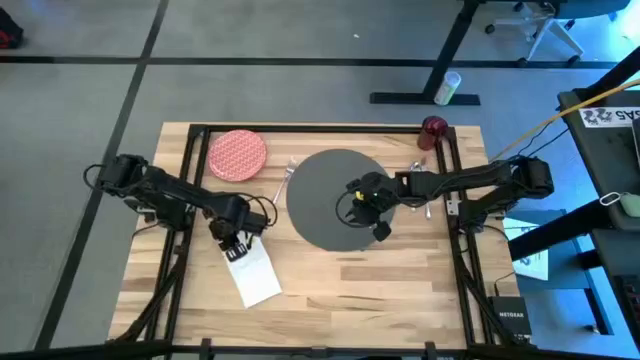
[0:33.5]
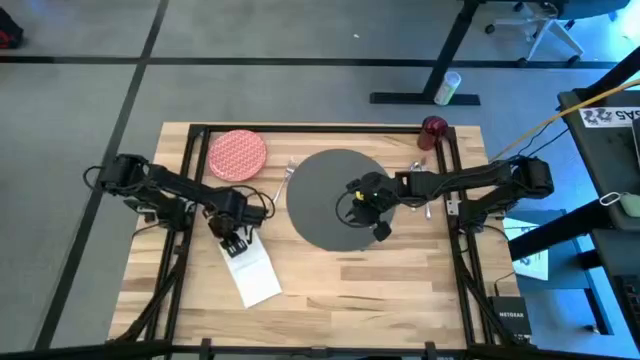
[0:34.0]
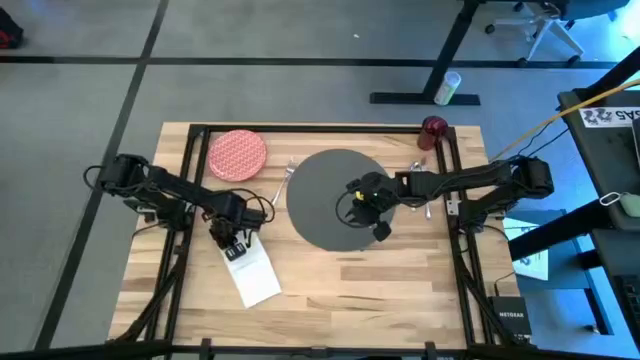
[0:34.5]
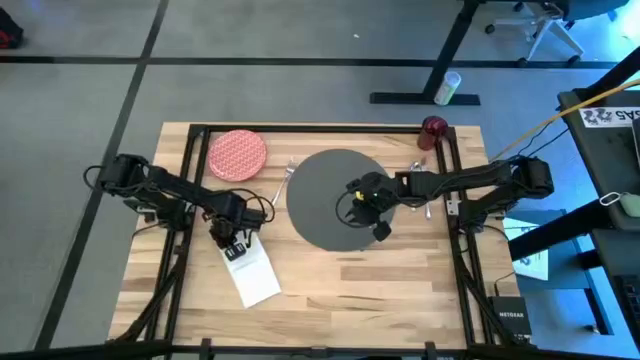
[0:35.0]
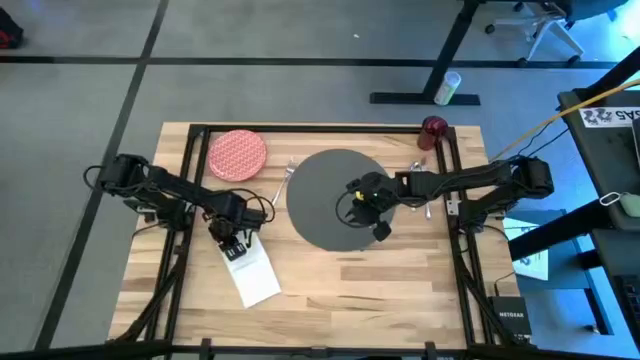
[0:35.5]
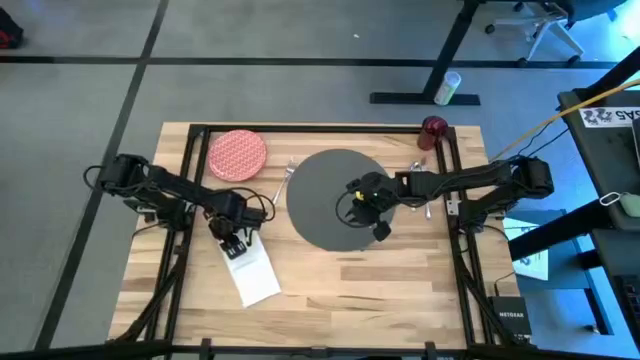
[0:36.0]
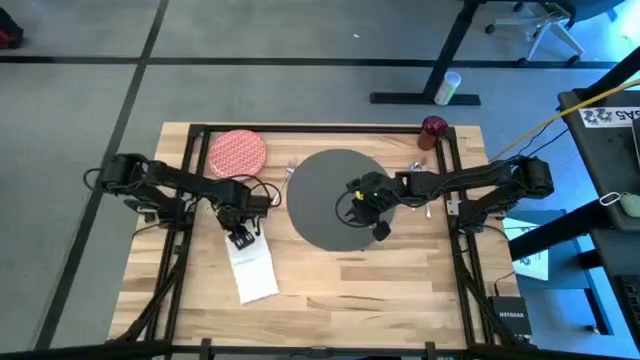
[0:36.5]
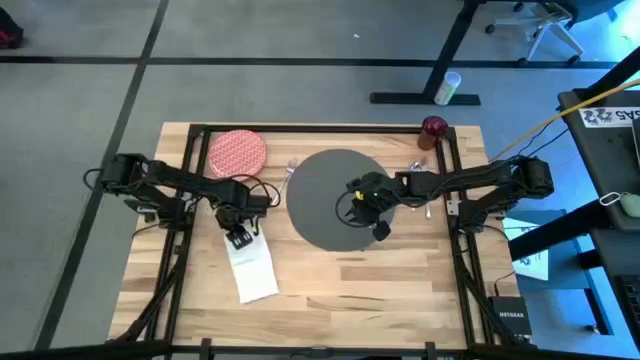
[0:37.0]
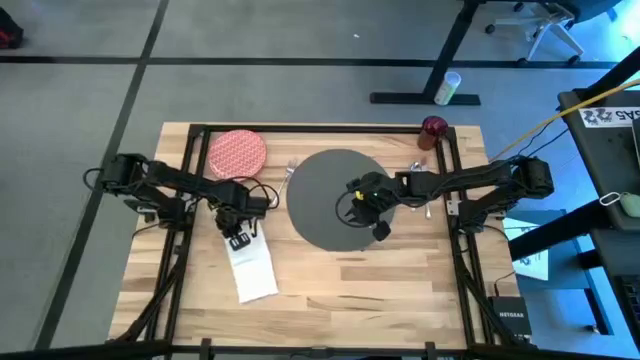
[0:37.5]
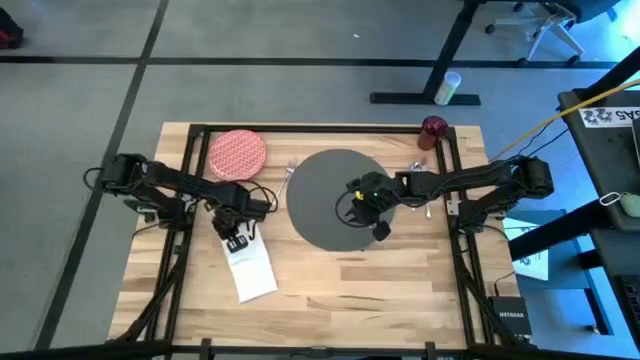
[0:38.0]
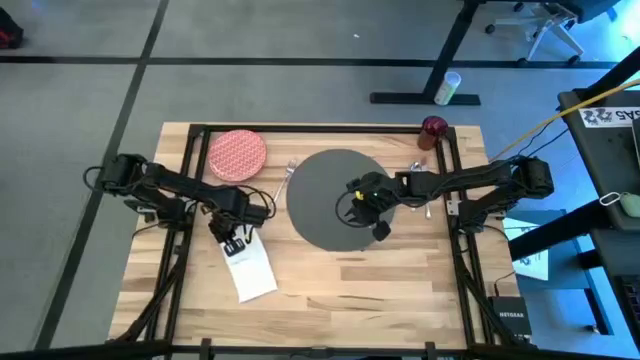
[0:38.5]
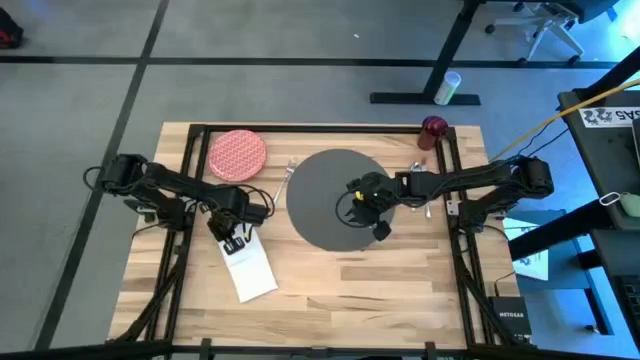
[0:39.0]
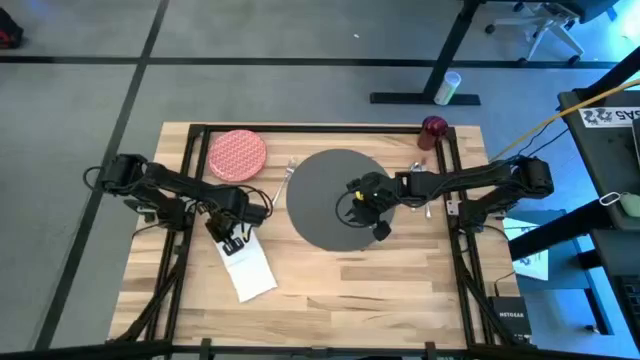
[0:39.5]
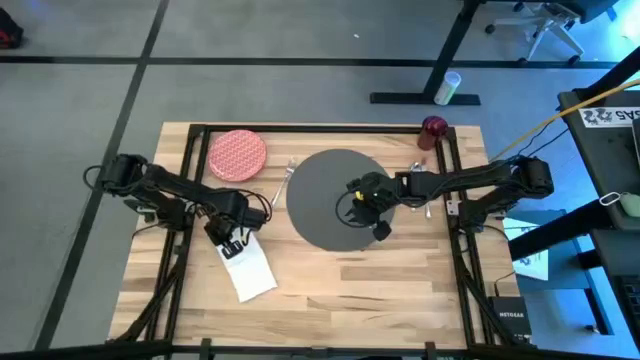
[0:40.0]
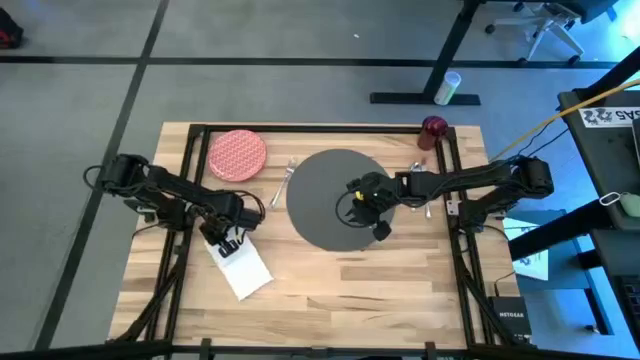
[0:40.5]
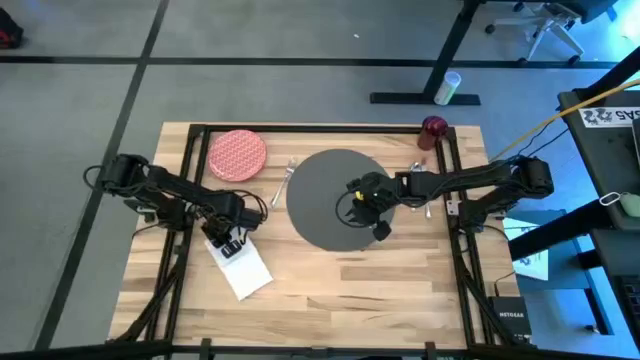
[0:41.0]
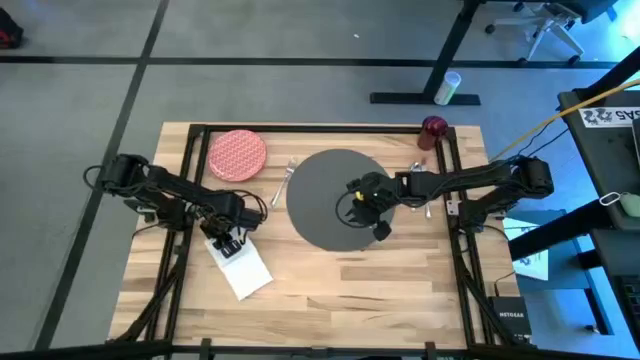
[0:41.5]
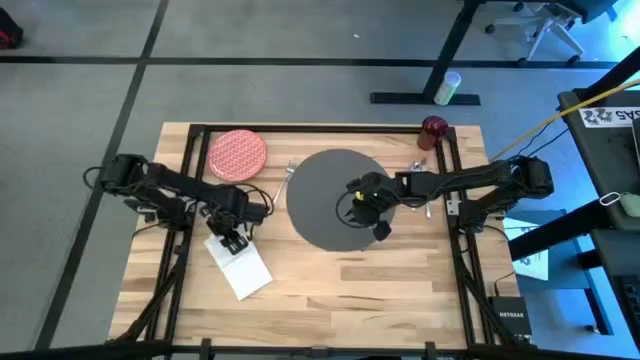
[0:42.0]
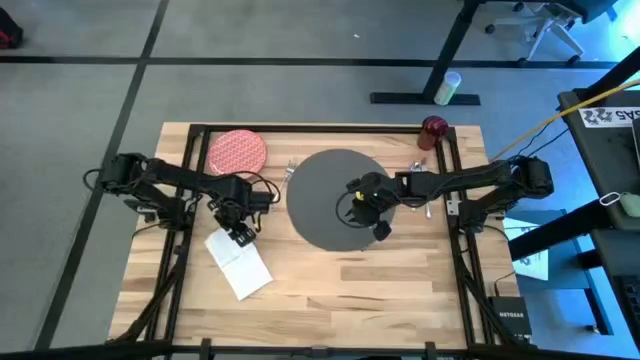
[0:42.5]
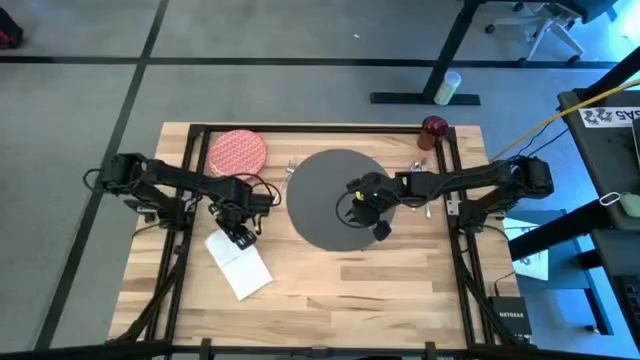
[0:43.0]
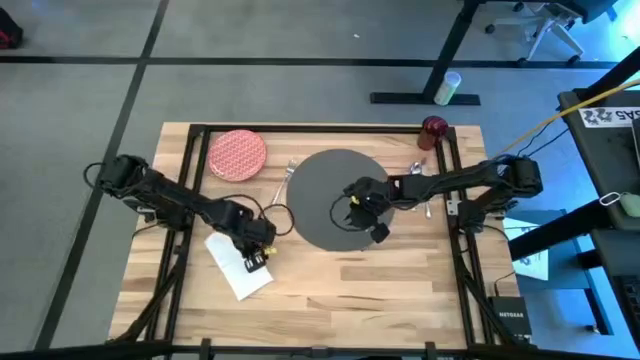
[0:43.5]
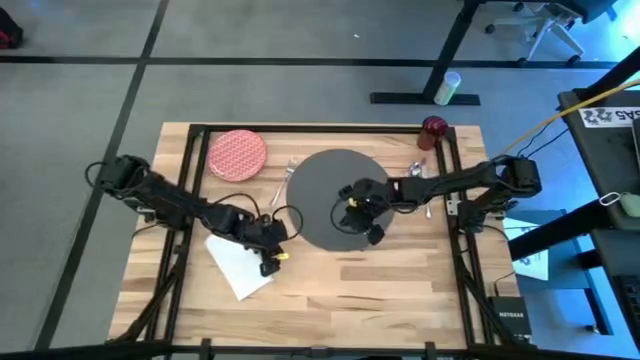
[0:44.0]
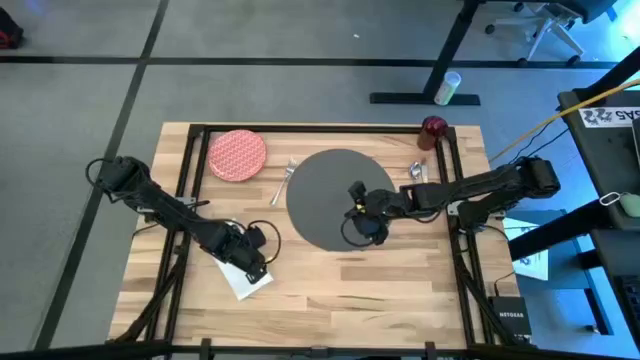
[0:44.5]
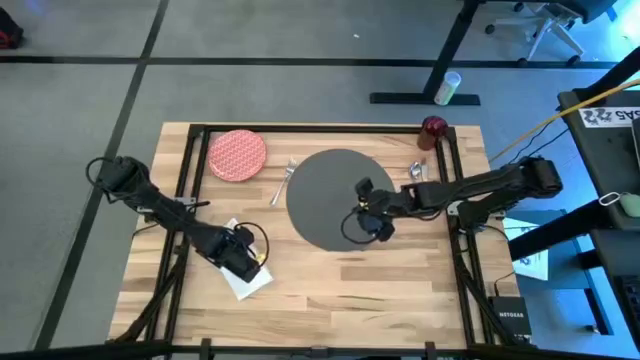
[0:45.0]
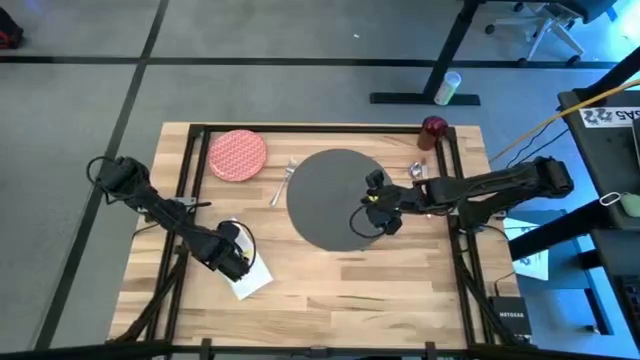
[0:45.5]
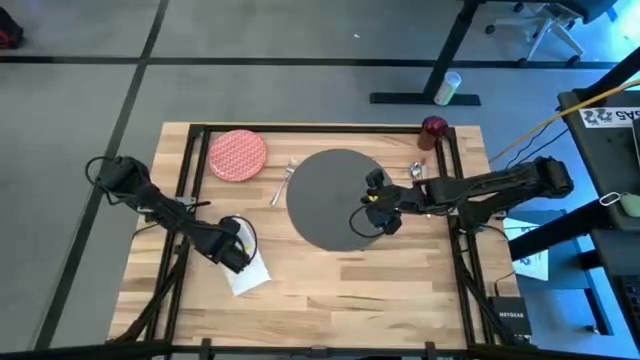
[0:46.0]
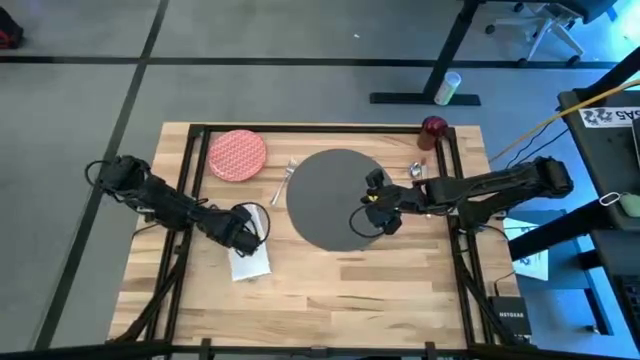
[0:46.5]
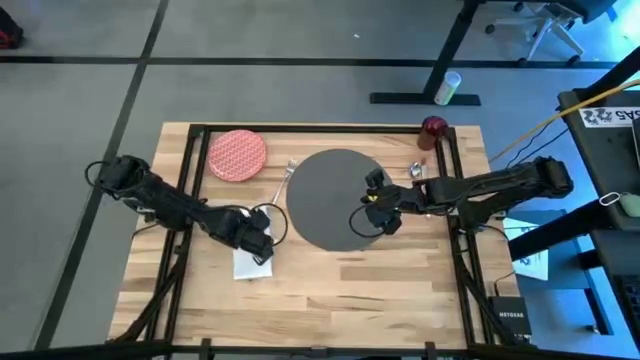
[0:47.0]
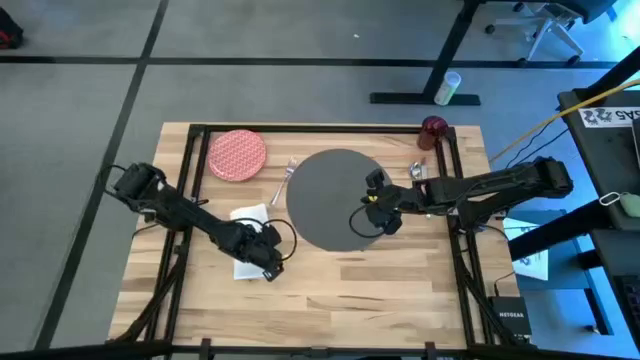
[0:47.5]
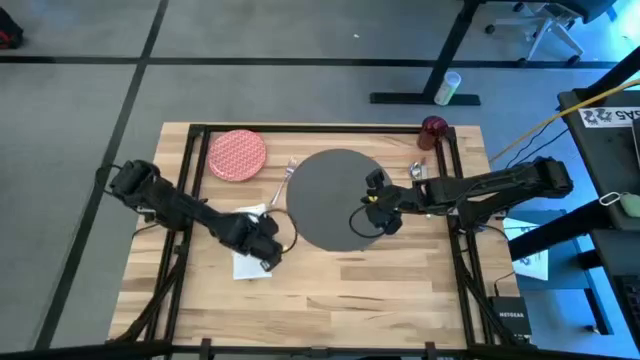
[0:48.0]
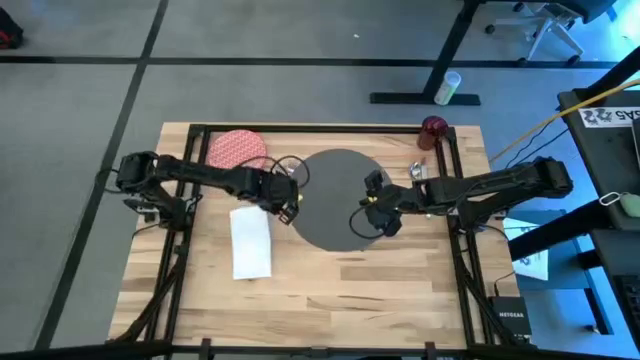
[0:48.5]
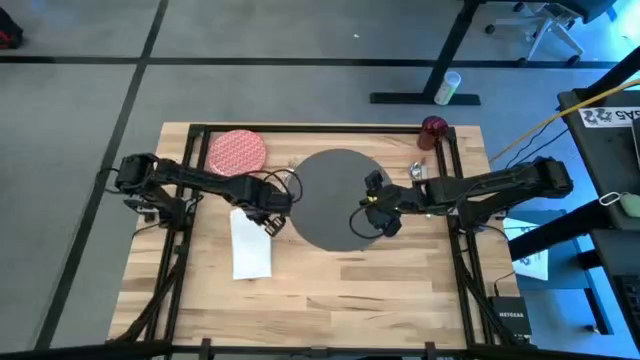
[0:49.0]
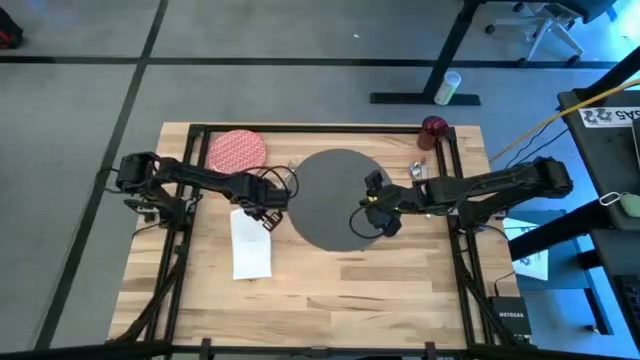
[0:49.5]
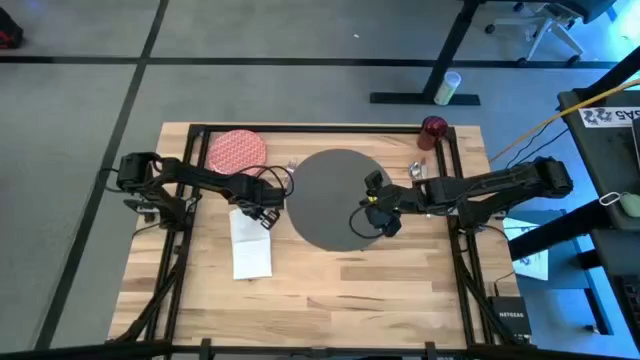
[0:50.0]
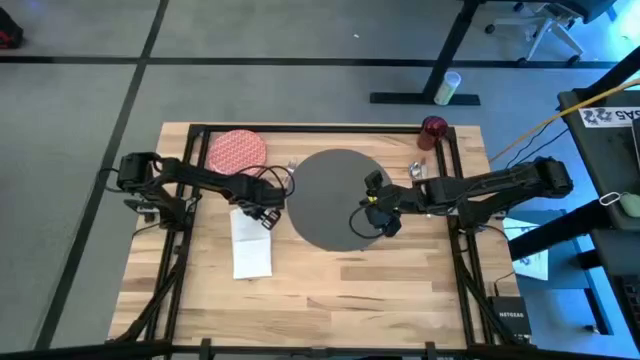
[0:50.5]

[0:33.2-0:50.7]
Task: Set table place
Fold the white table napkin

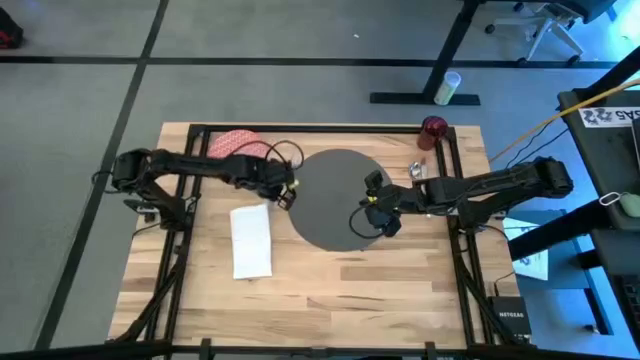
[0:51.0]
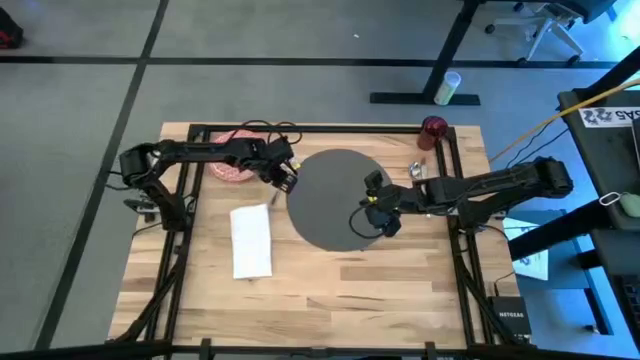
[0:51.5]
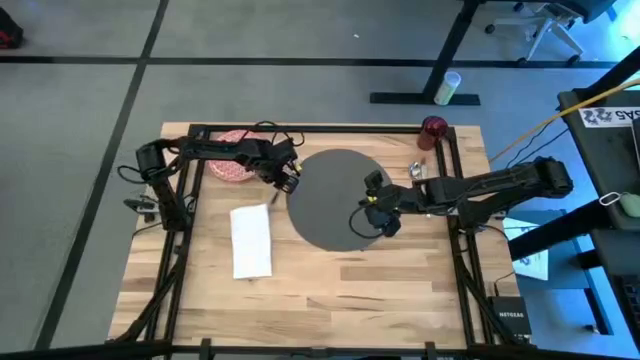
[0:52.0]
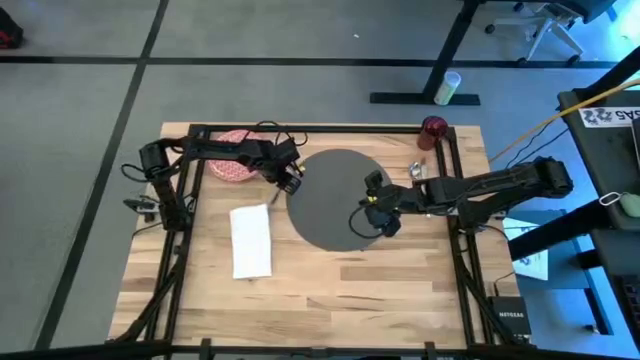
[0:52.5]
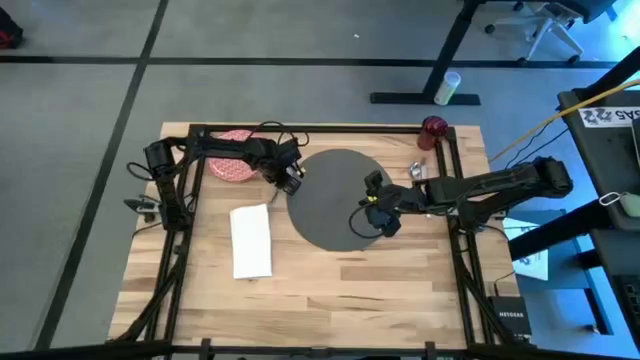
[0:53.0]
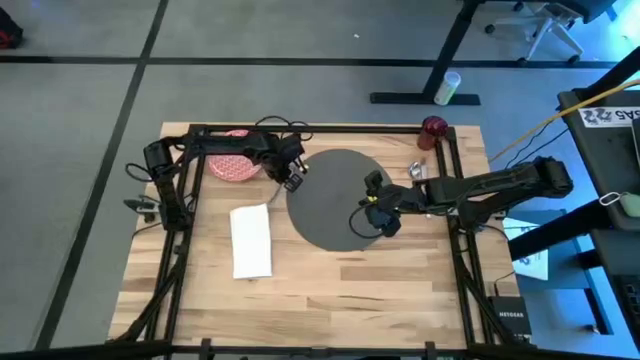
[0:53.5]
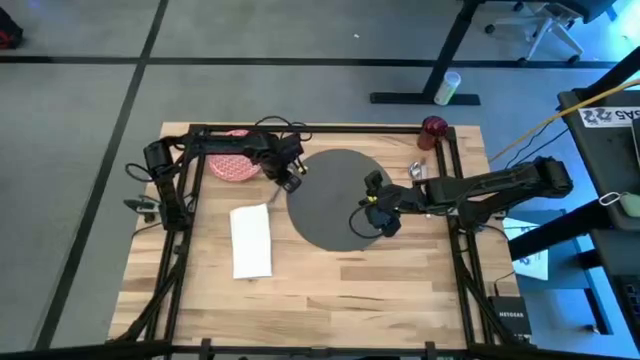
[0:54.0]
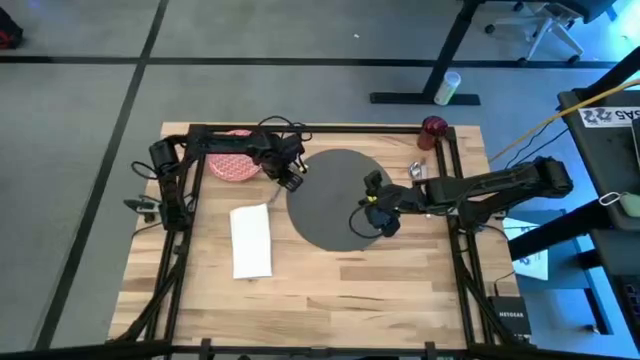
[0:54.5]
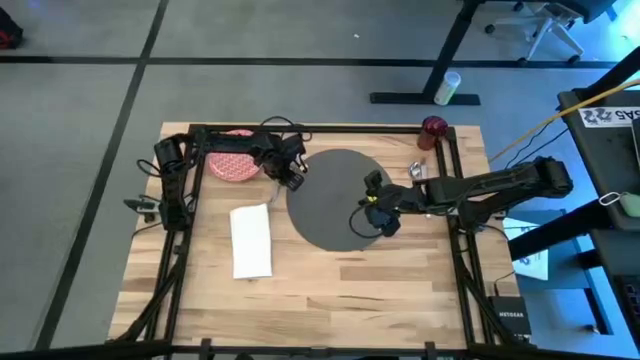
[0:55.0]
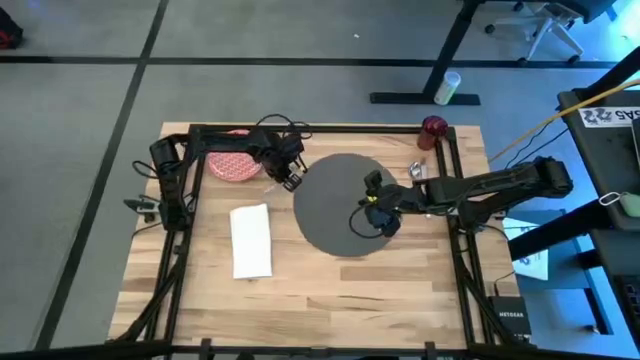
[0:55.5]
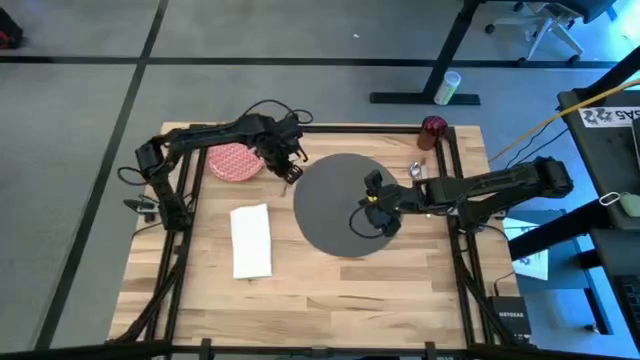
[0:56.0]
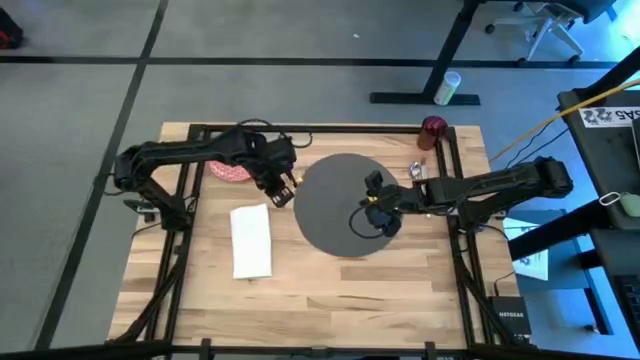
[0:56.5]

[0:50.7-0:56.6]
Put the silver fork on the table white napkin
